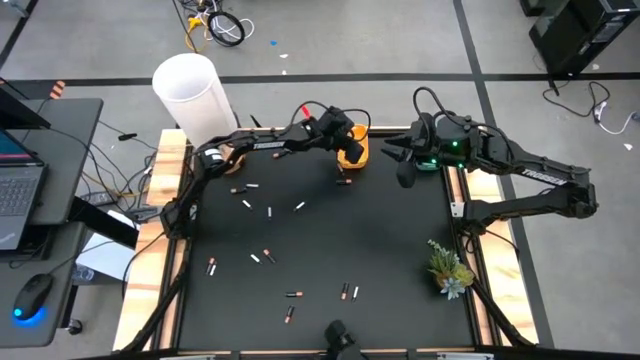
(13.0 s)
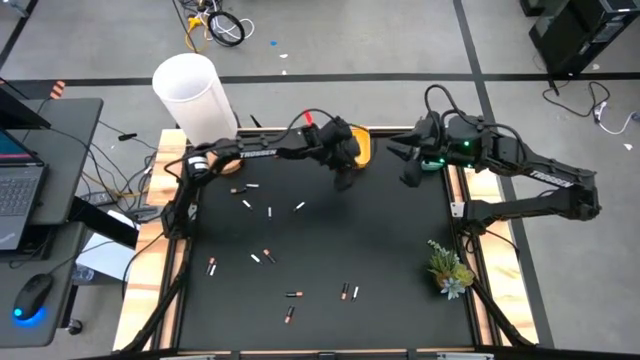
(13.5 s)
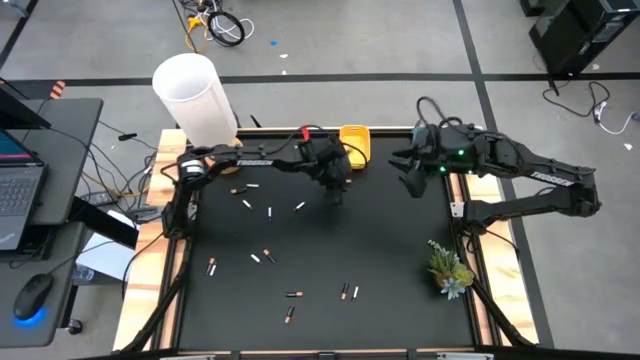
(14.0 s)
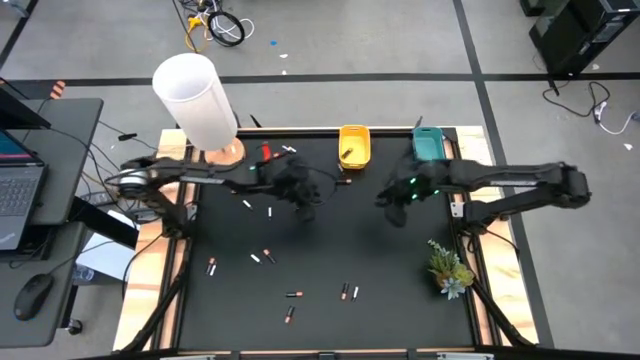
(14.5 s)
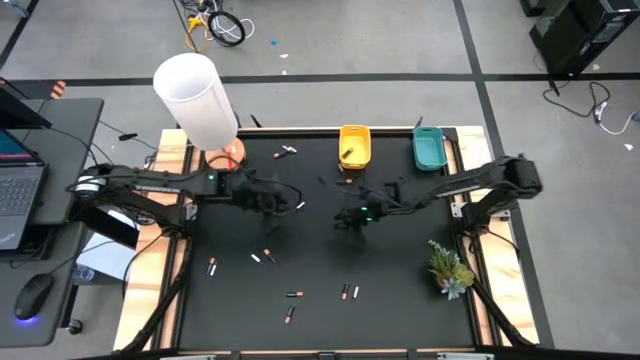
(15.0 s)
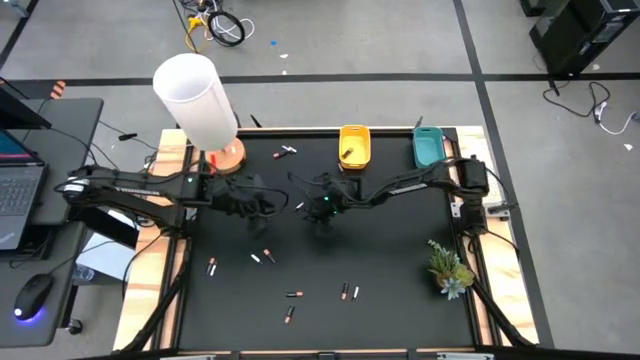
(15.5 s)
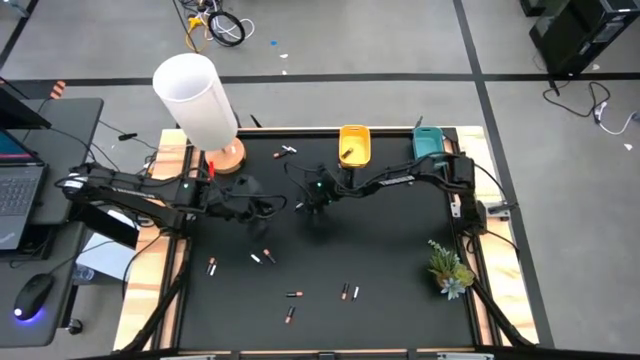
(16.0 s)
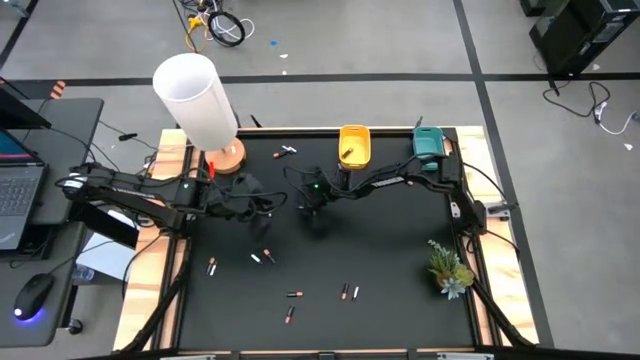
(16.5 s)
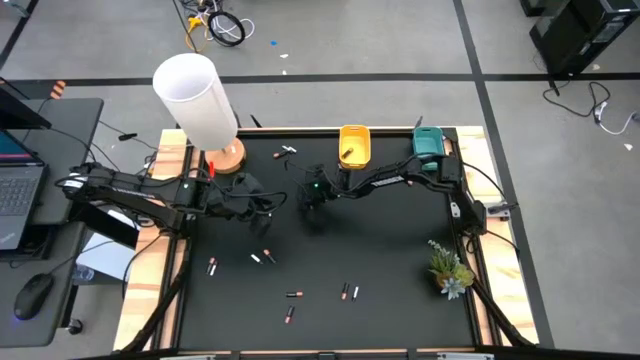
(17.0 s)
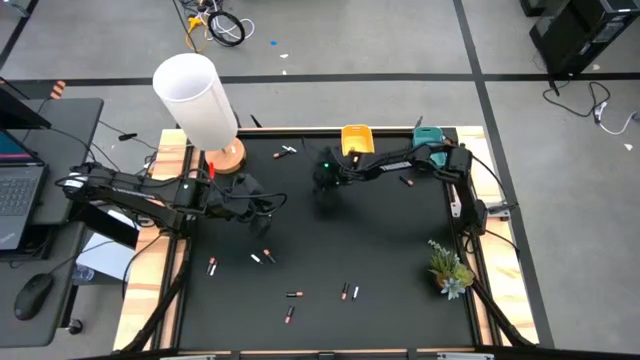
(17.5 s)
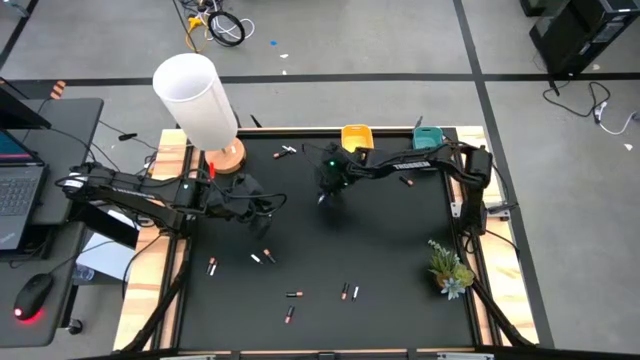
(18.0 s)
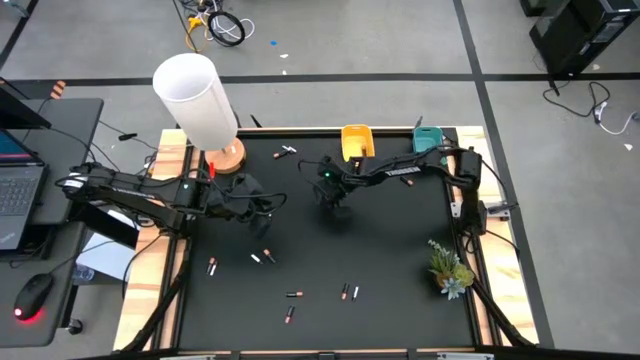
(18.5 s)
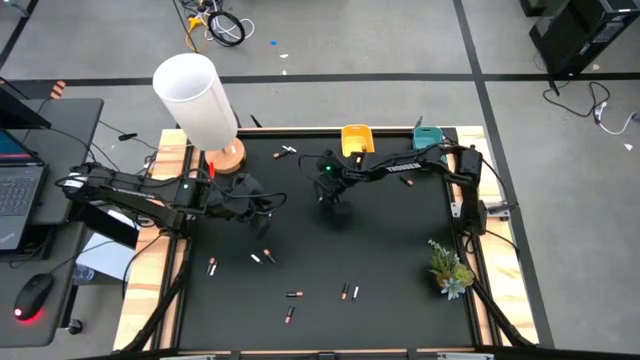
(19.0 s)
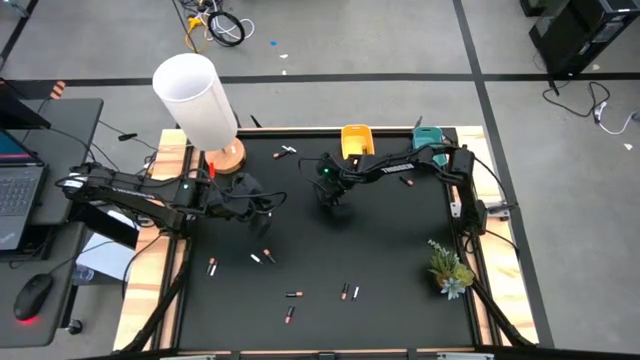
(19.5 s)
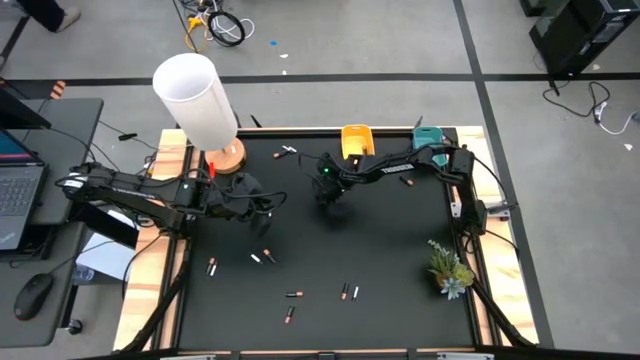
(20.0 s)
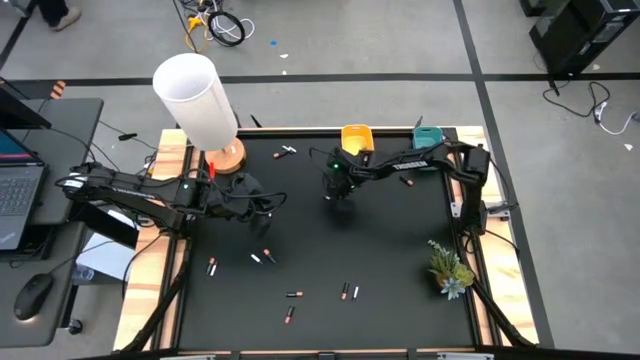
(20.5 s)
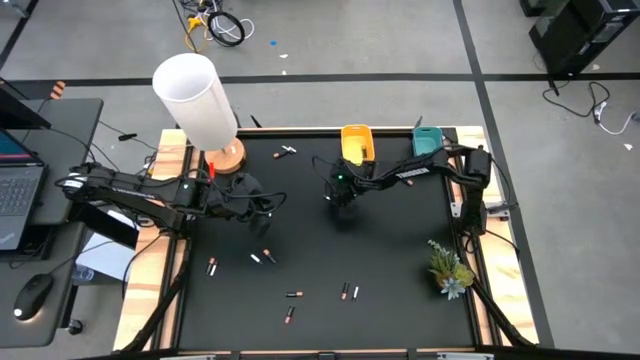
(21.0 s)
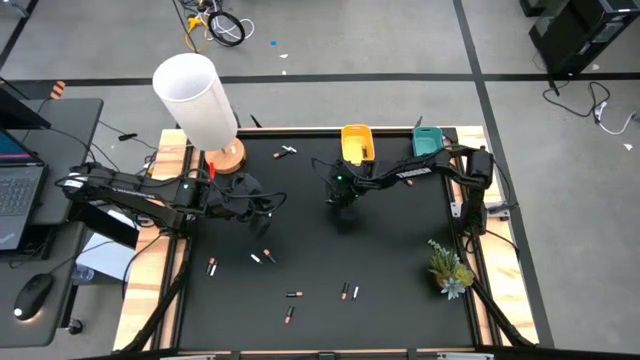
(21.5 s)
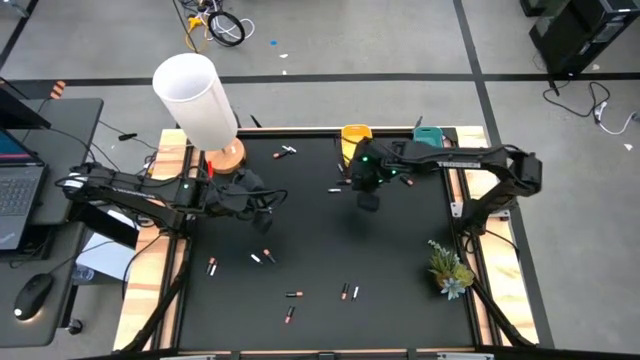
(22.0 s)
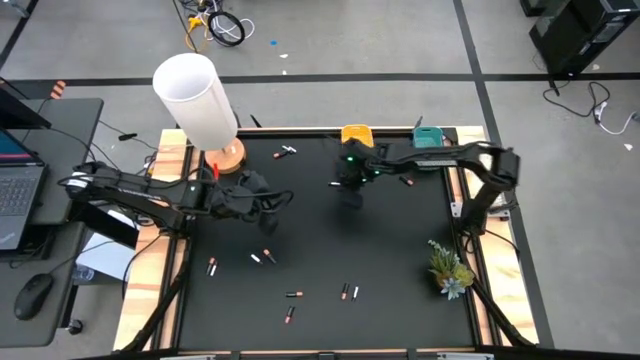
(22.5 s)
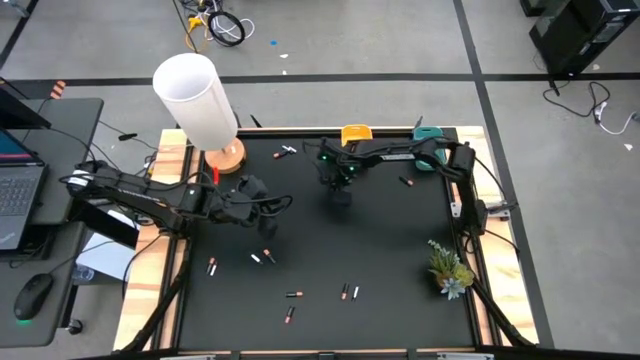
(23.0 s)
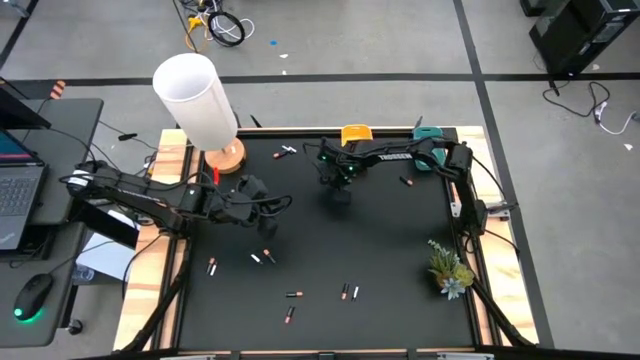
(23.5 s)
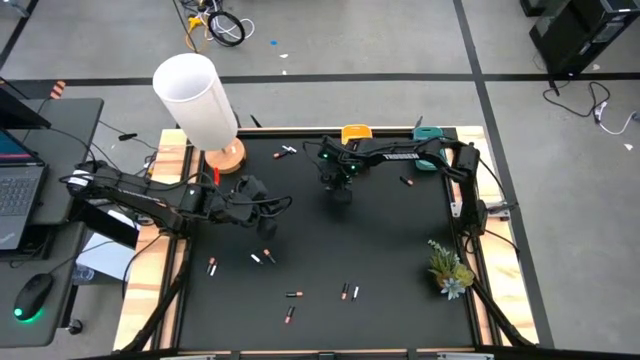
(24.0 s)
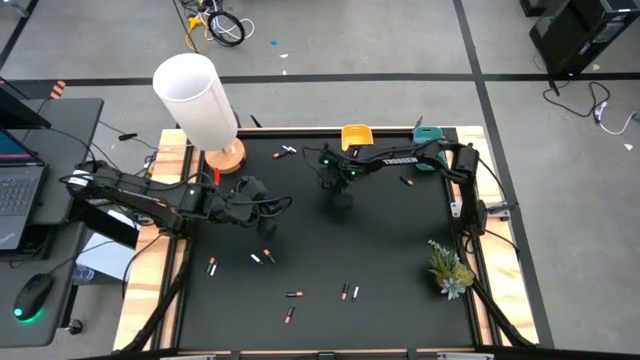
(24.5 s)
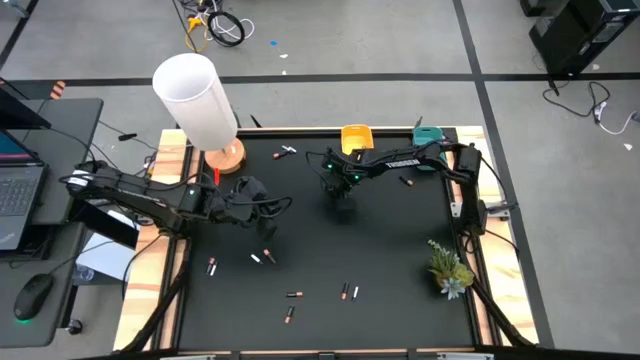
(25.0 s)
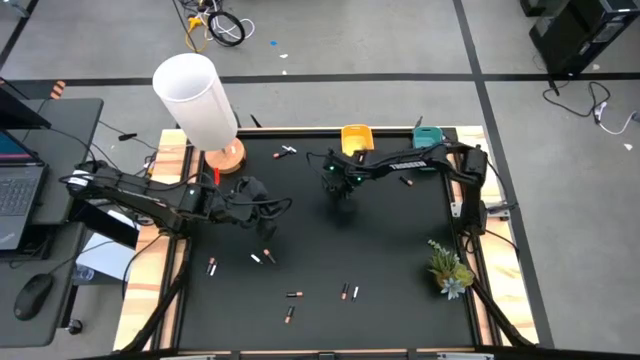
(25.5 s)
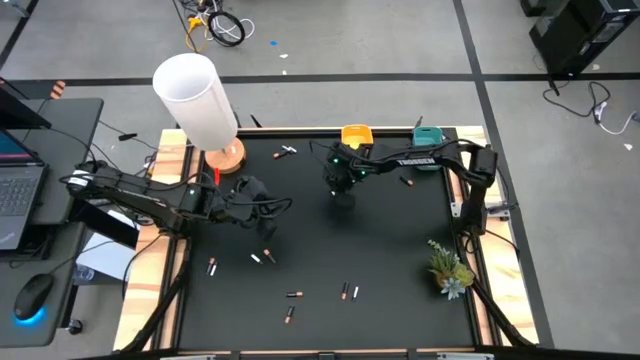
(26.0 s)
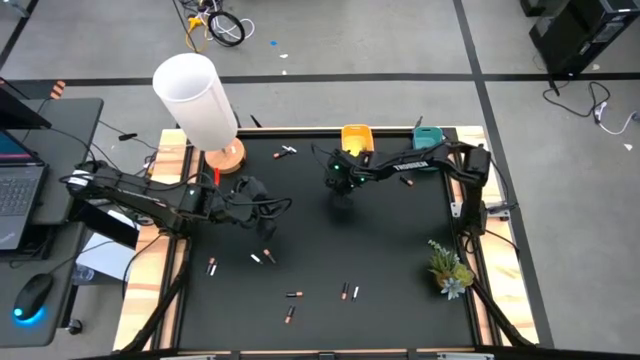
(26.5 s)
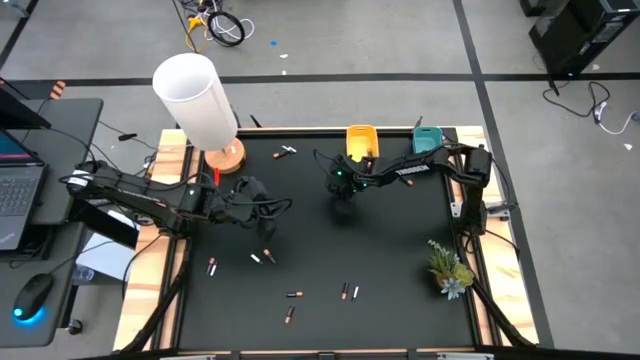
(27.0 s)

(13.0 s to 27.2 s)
Task: Sort batteries
Put the silver battery into the blue bin

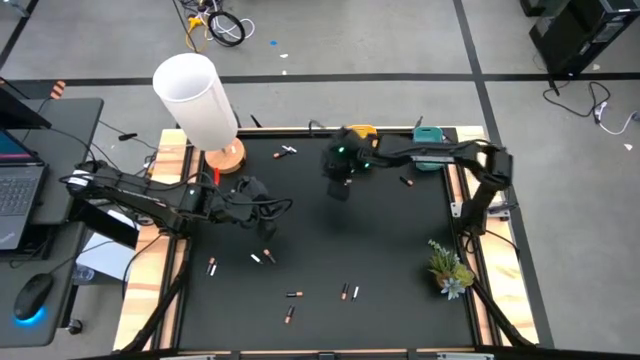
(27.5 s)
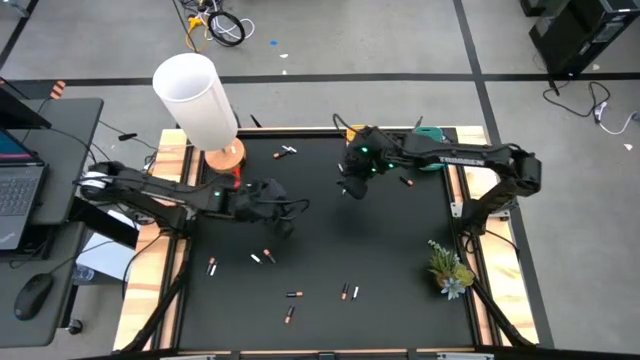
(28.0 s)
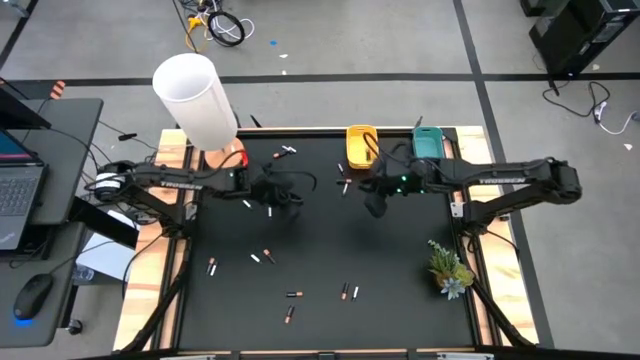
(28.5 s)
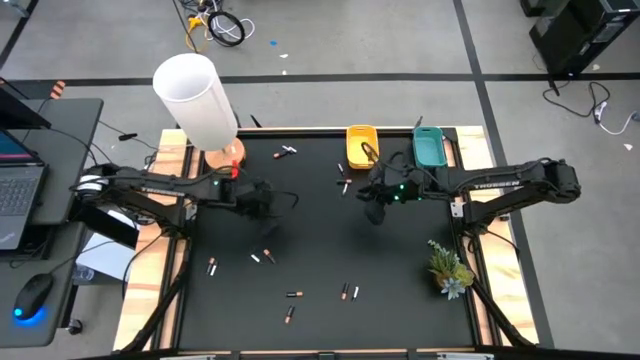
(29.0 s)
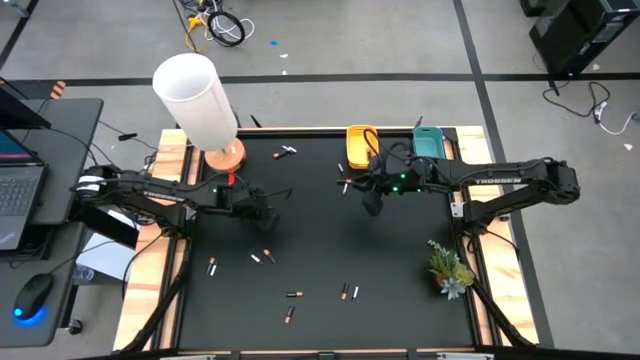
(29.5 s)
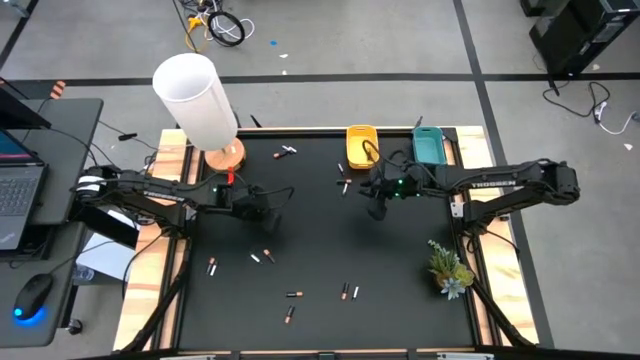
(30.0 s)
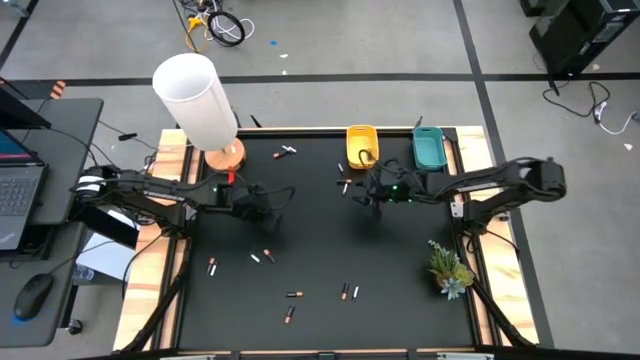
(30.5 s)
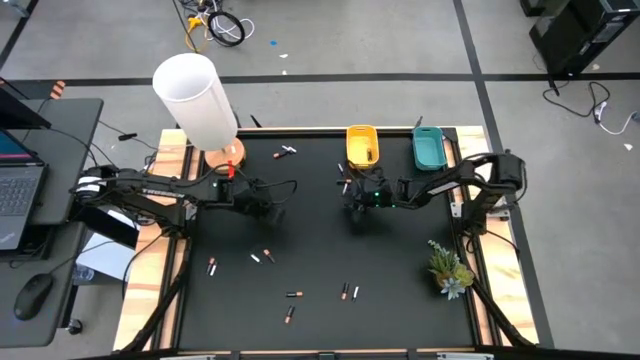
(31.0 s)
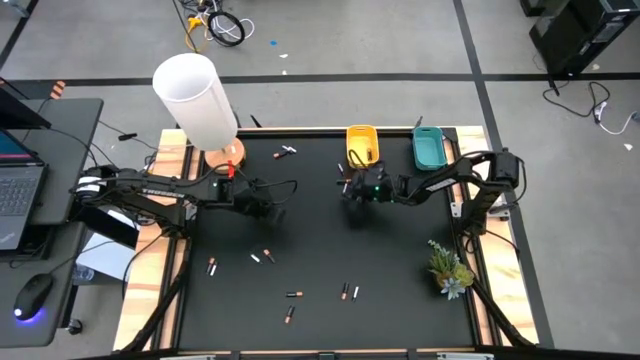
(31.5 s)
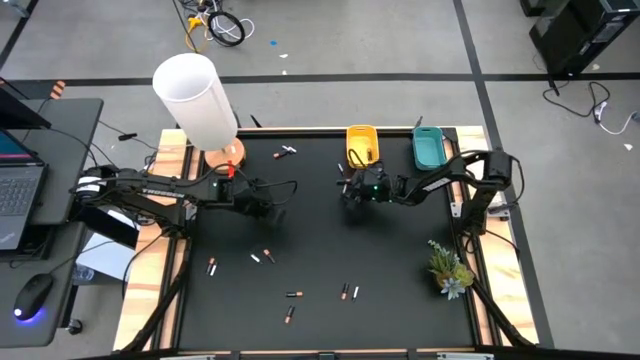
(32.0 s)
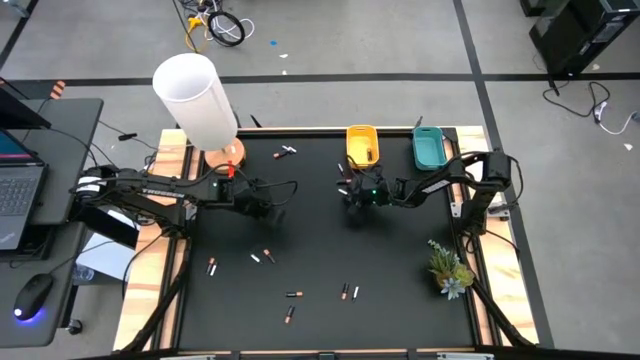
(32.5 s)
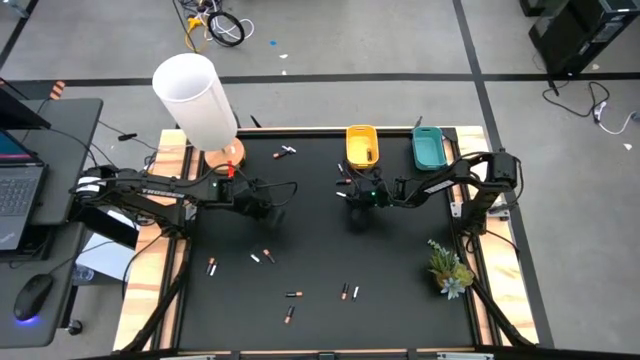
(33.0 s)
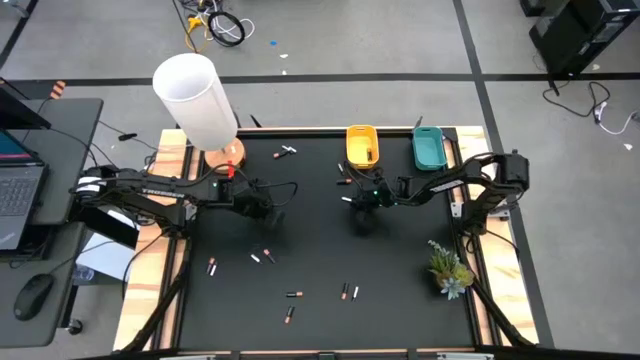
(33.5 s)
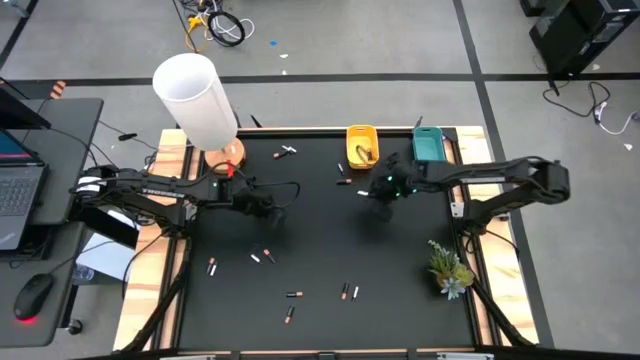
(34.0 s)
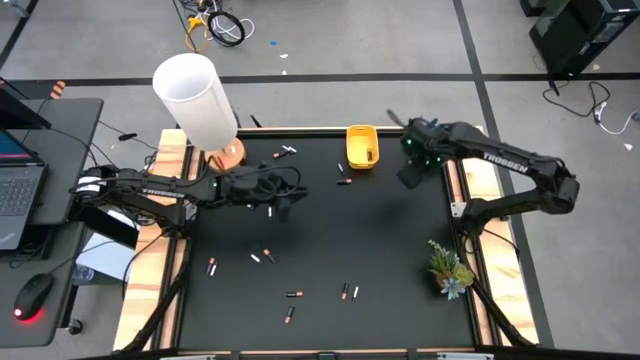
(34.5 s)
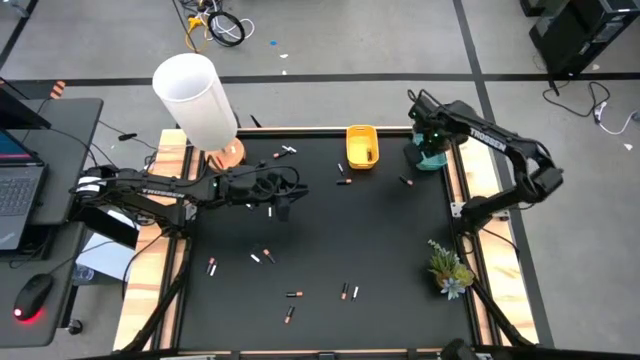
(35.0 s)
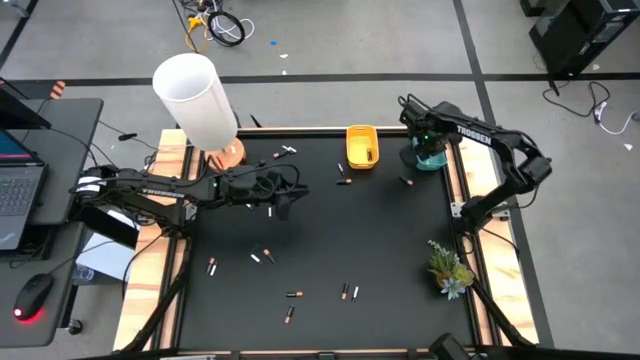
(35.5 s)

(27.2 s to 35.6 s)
Put the silver battery into the blue bin
